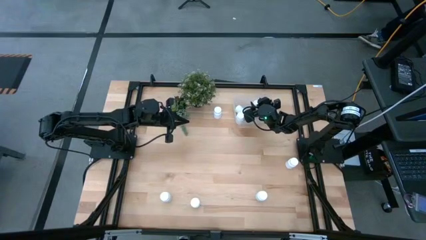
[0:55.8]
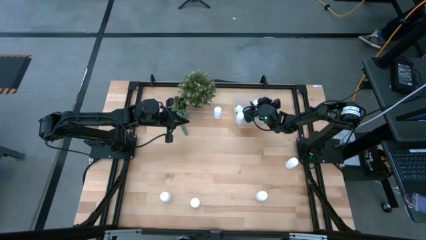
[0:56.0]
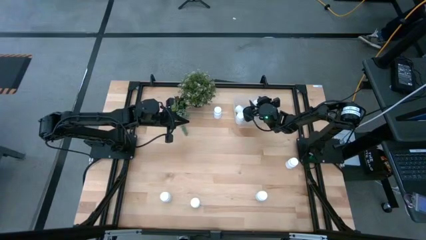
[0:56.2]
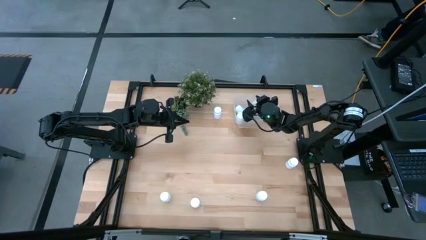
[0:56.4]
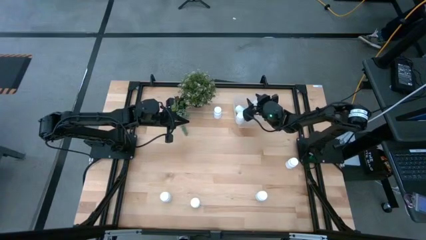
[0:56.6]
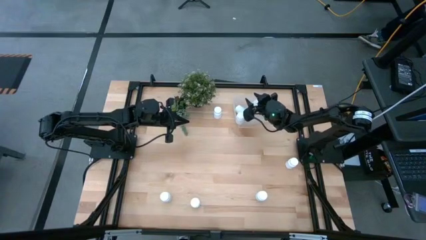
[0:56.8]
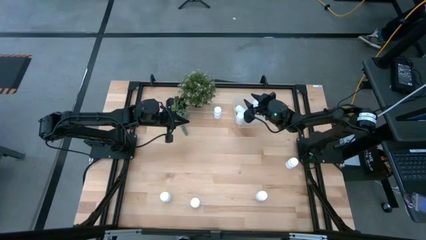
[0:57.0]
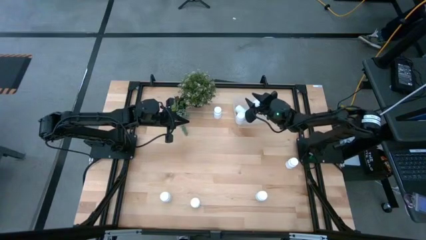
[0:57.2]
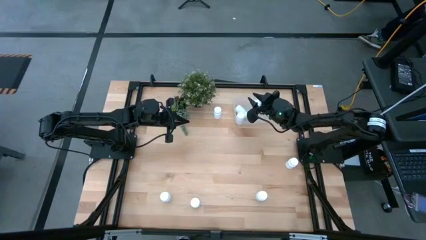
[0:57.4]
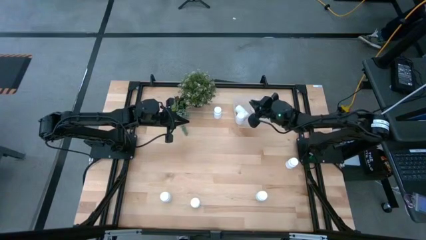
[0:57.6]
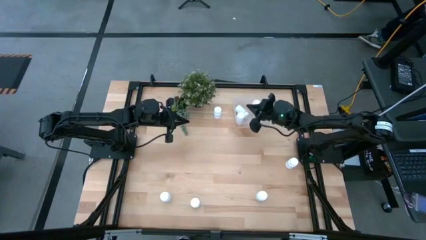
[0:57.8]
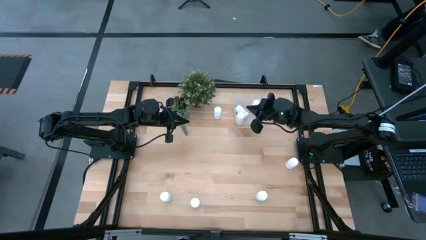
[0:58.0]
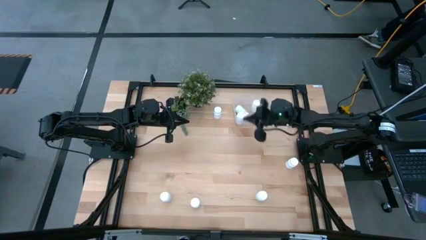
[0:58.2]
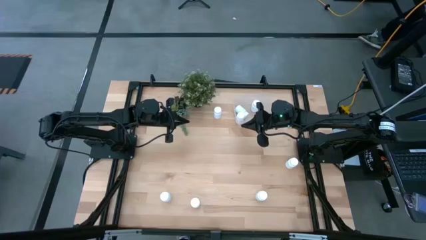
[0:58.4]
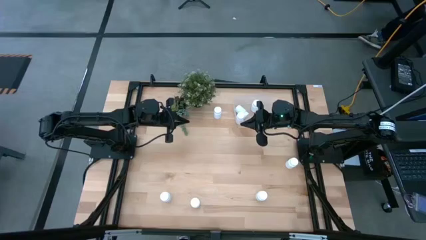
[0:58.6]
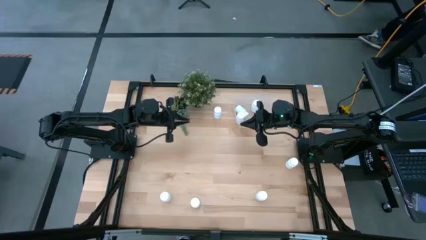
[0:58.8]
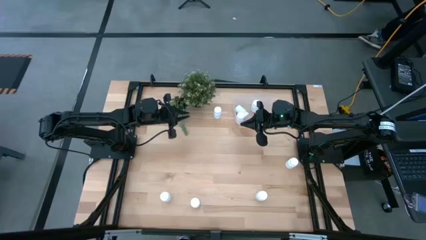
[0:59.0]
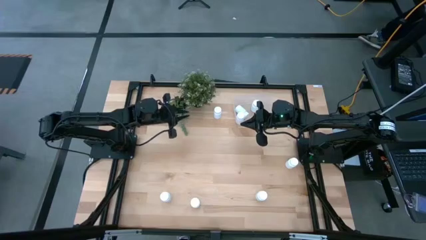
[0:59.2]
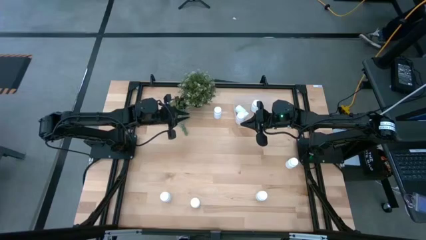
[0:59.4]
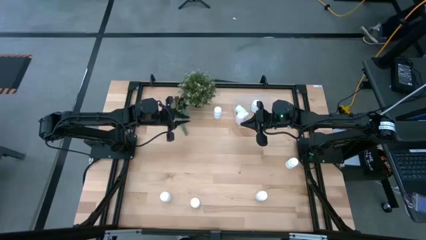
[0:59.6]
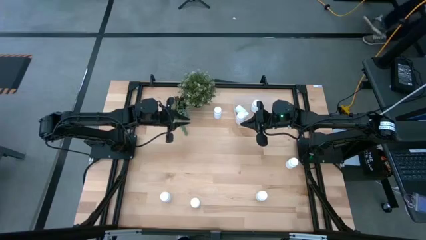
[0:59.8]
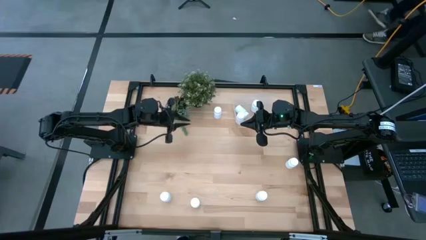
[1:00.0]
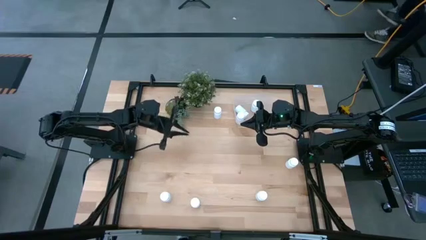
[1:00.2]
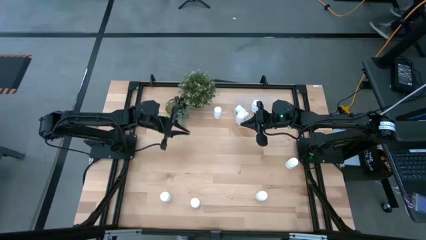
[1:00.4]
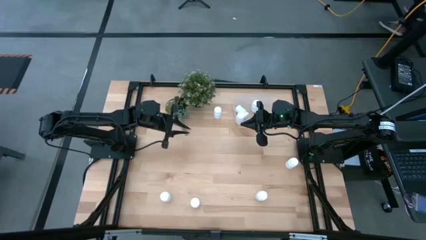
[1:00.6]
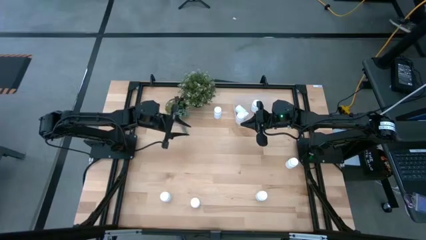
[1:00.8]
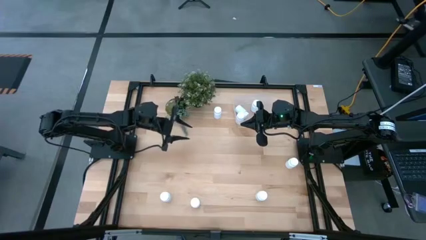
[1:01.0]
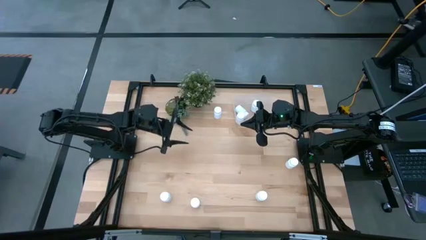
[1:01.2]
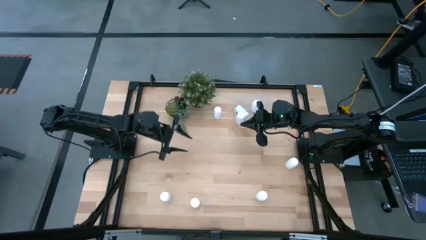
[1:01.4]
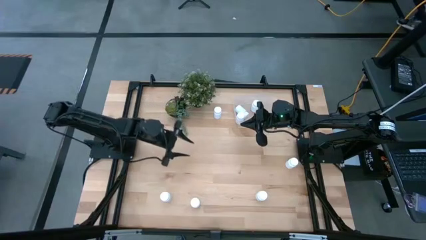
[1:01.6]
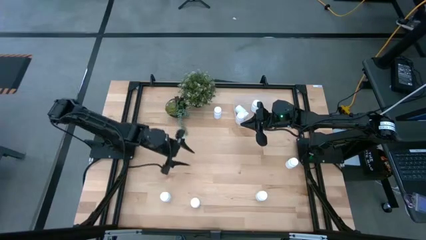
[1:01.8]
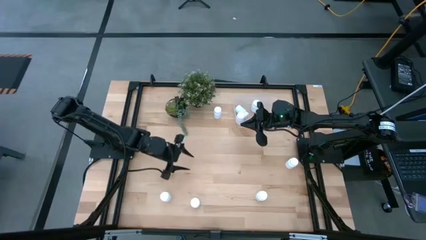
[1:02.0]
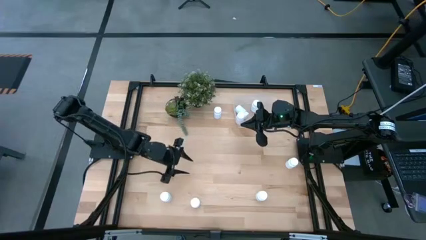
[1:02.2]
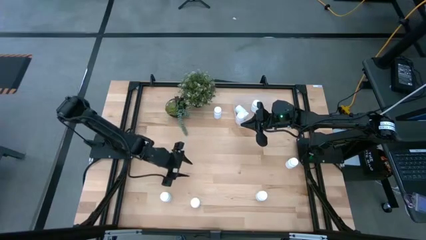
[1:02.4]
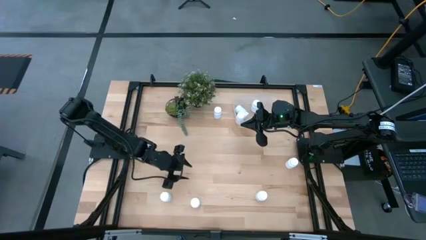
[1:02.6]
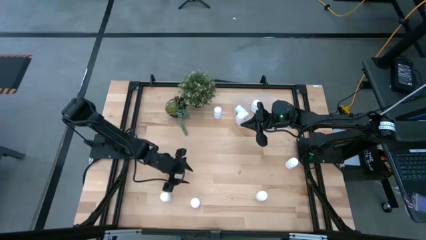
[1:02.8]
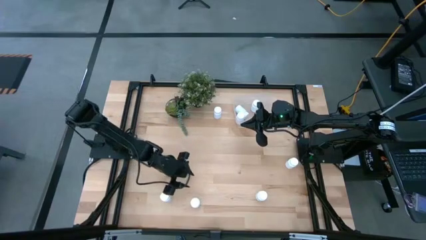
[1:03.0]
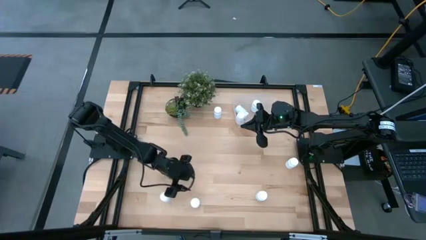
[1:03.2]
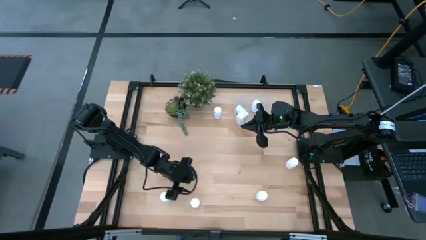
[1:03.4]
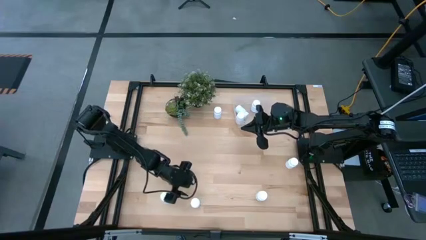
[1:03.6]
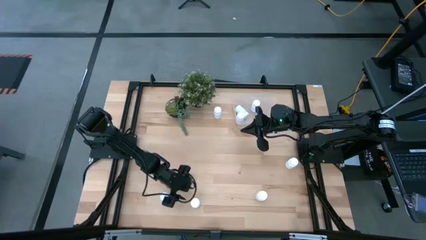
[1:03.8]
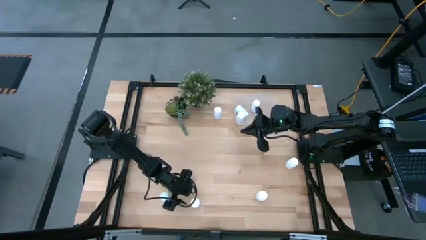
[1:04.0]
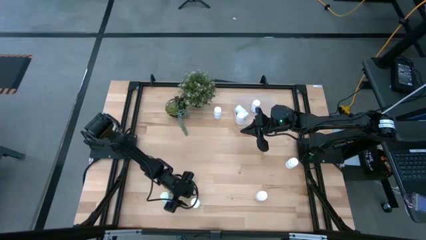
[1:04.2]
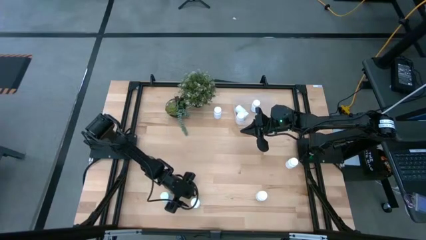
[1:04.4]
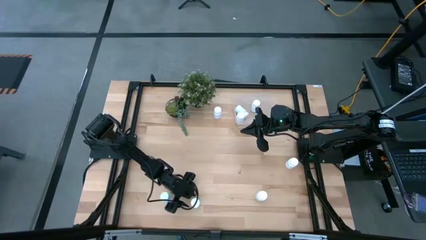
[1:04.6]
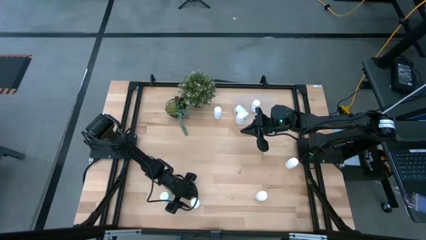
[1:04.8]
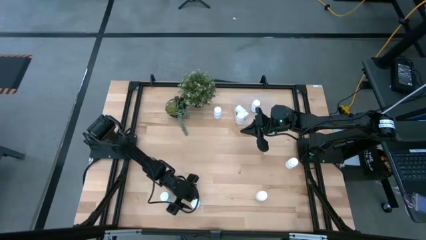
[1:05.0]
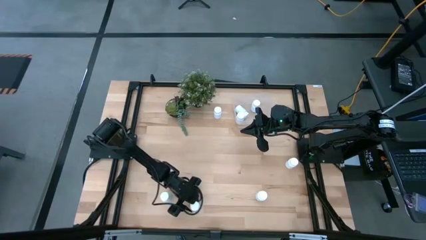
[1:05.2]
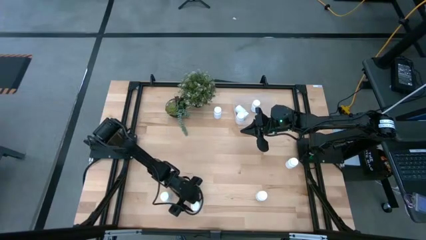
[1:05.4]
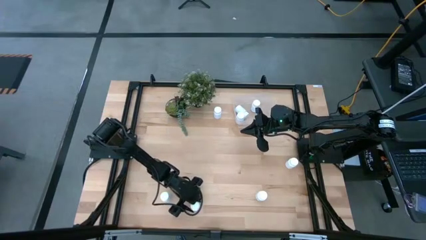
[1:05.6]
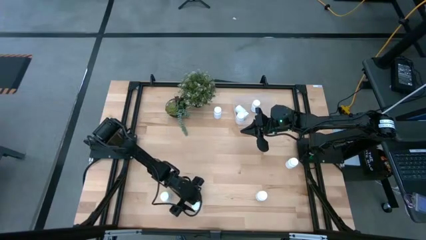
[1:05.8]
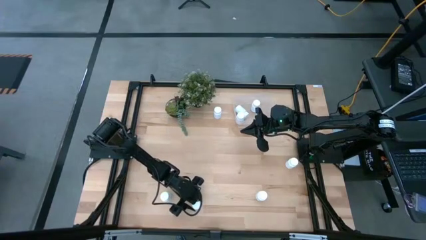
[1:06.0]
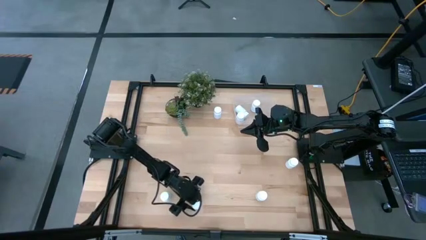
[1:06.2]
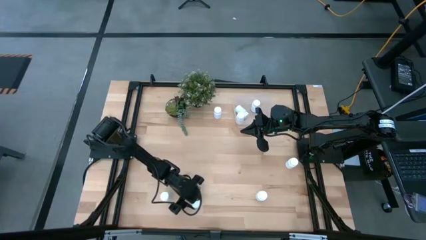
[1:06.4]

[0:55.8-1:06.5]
Task: Pick and place pill bottles into a basket
Put the white pill bottle into the transparent bin

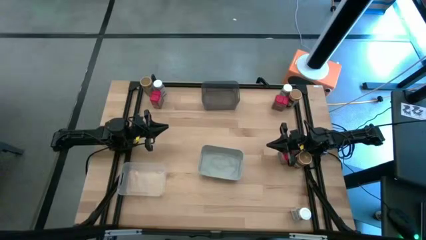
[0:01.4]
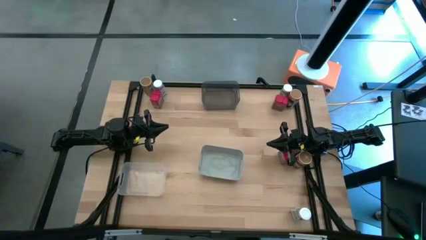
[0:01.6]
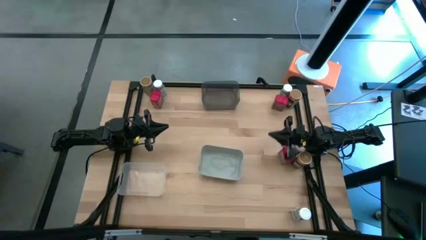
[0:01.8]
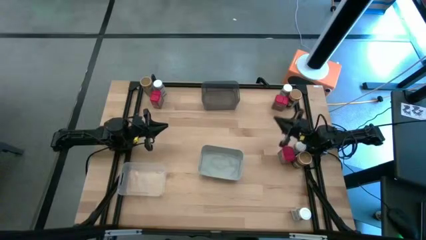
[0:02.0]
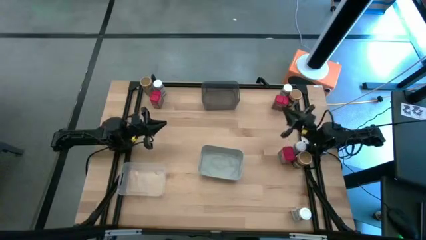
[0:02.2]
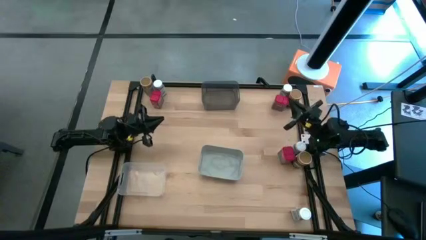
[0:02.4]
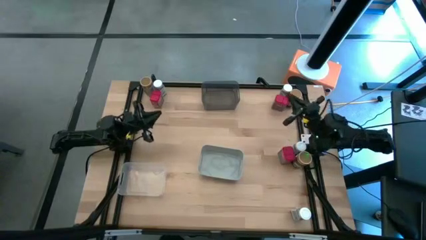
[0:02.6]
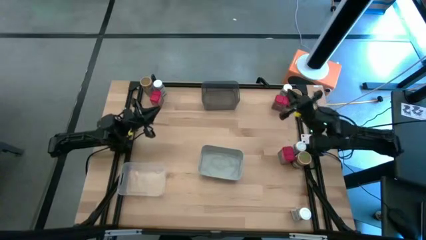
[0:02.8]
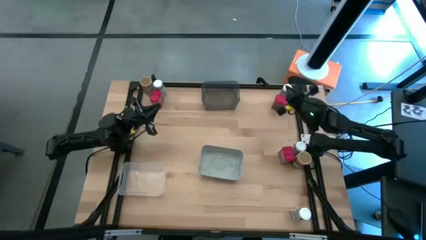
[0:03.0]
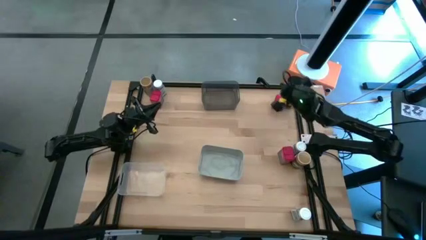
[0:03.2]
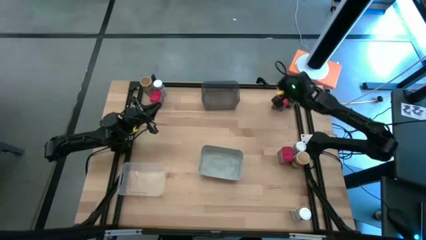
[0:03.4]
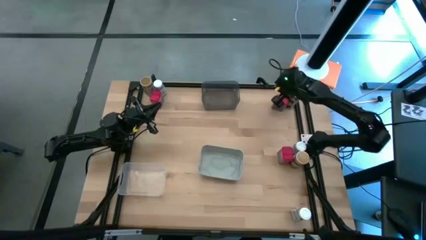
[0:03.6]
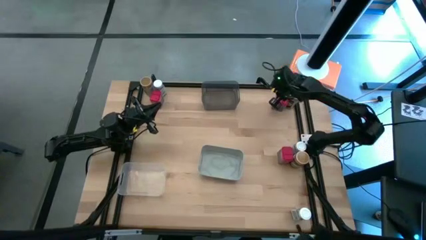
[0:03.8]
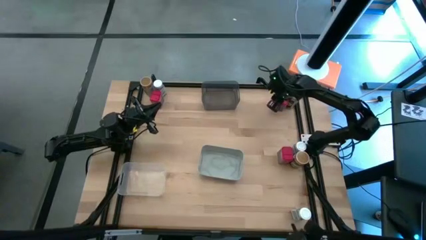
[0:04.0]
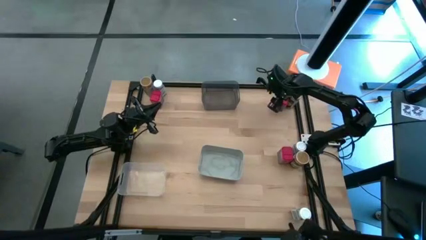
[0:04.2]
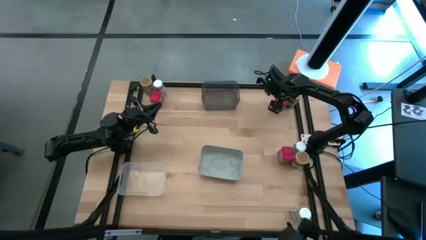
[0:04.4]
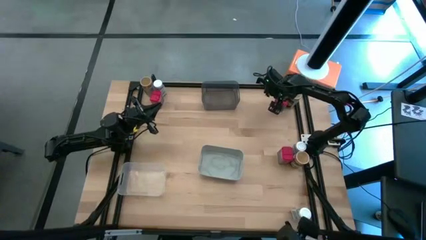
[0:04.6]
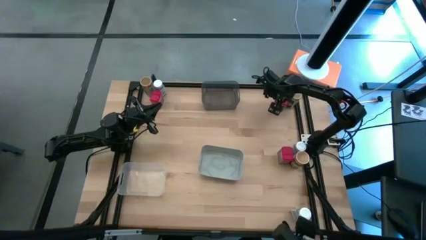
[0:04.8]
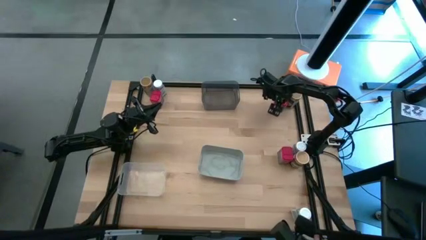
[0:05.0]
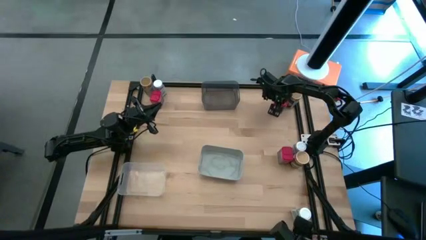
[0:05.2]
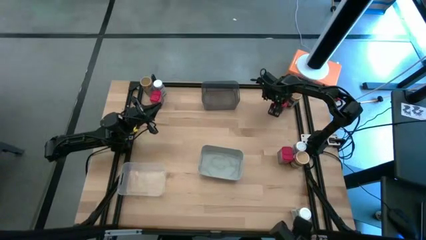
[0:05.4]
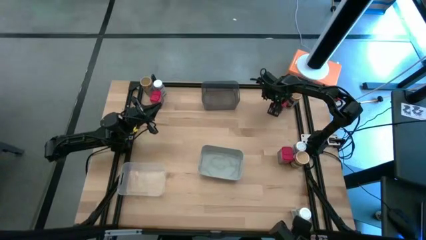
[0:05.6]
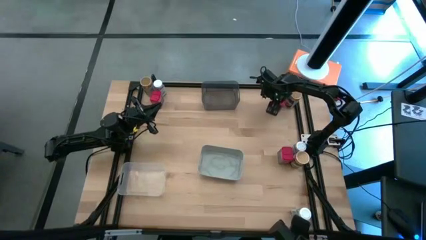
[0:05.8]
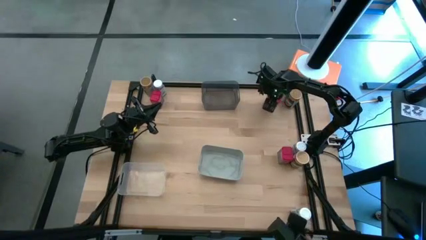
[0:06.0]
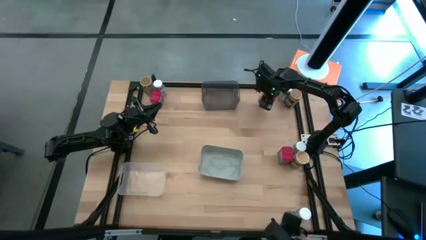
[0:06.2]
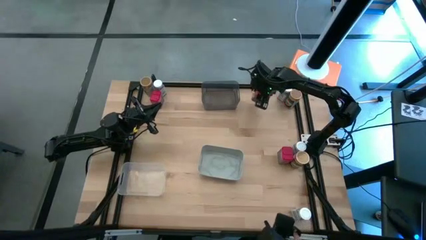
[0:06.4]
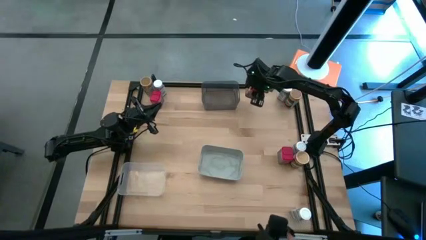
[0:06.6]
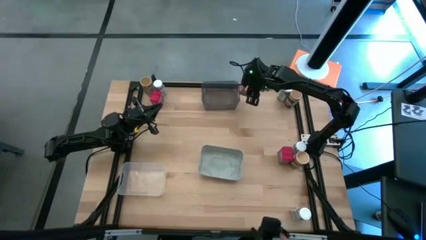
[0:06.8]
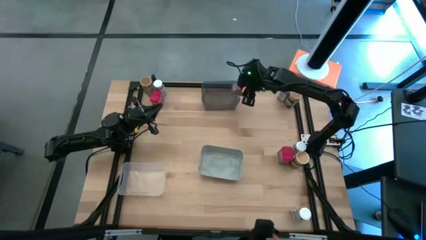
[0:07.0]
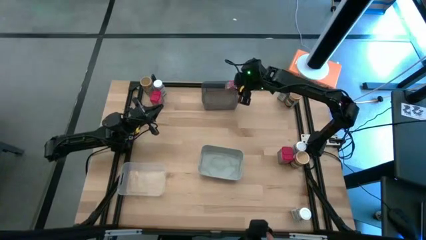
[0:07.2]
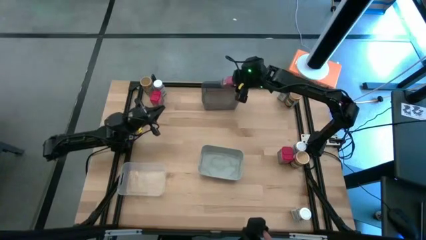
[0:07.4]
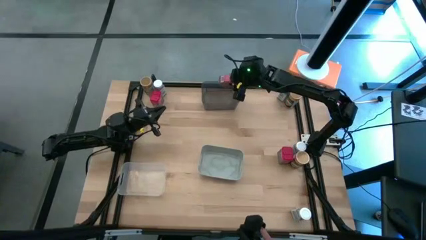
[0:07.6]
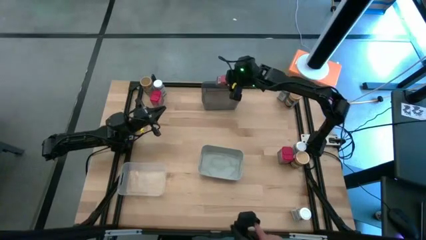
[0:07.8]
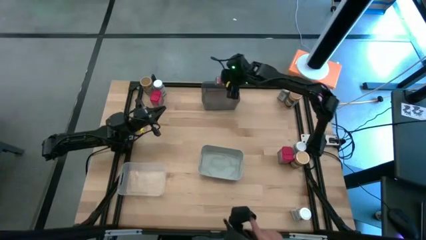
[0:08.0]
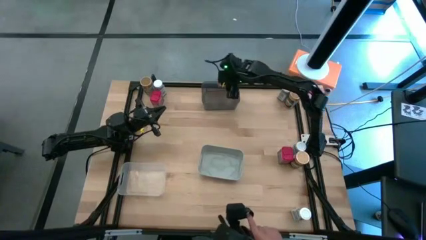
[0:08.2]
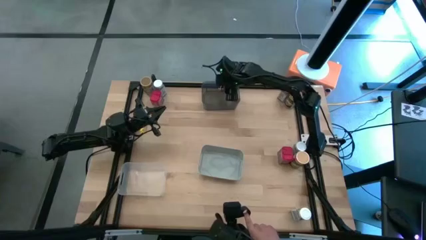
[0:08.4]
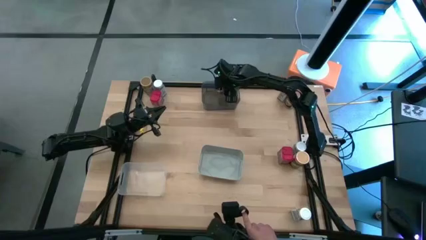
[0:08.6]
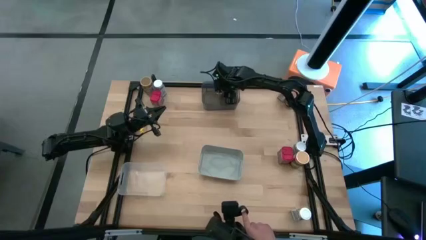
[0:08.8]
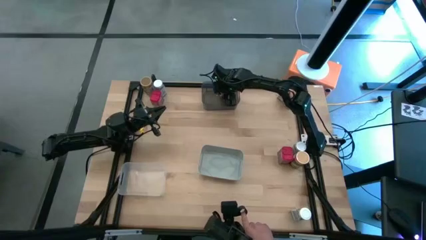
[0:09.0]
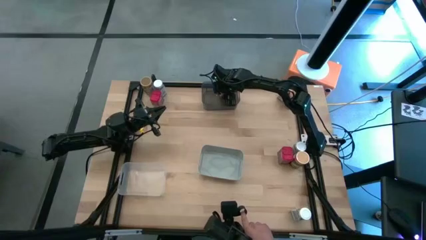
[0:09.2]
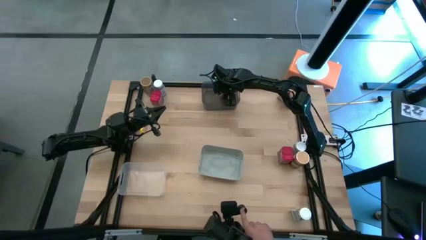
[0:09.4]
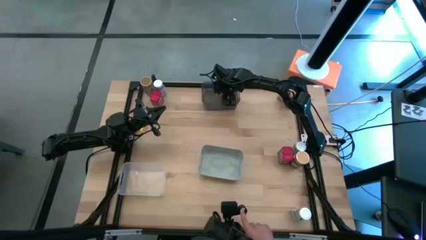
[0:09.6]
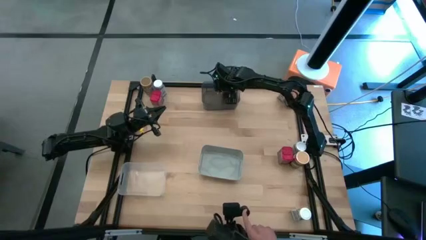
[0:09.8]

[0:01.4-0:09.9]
Task: Sort spices by type
Put the top right red seasoning can into the black bin
